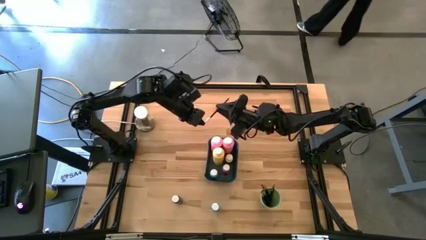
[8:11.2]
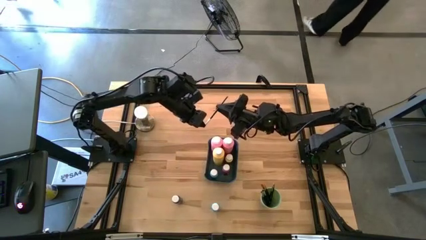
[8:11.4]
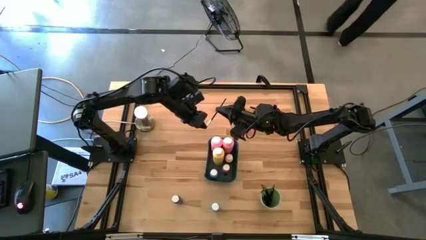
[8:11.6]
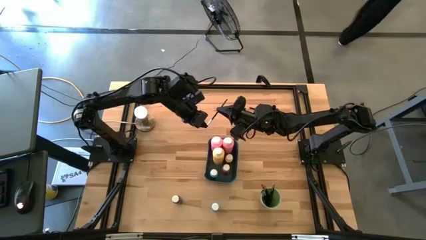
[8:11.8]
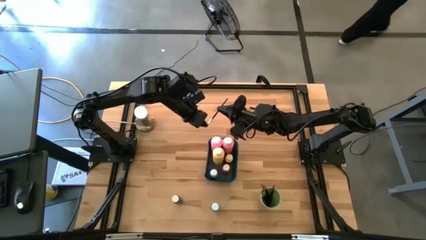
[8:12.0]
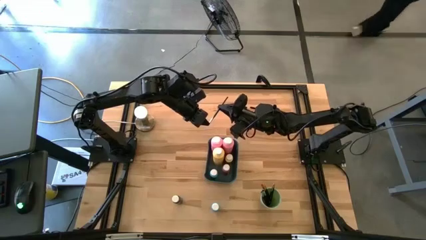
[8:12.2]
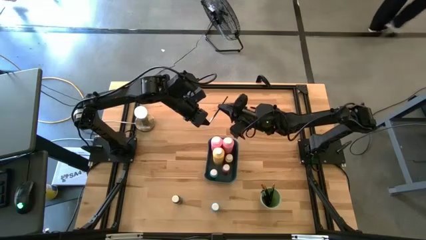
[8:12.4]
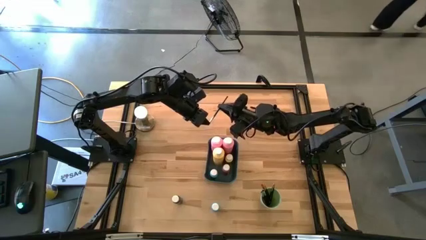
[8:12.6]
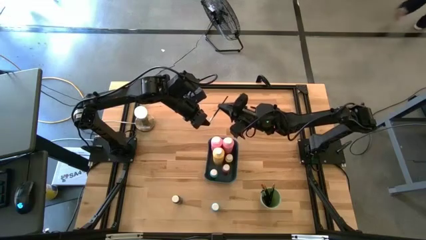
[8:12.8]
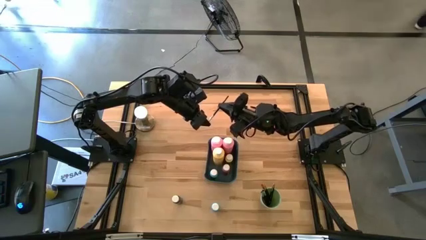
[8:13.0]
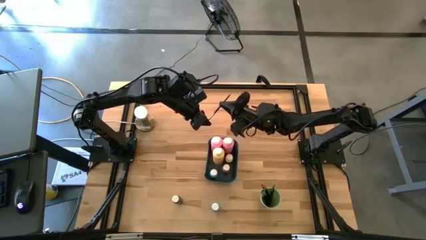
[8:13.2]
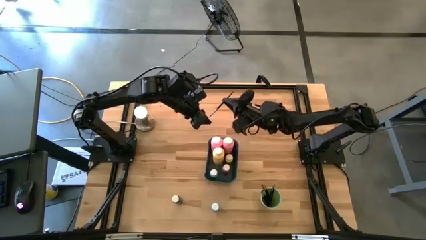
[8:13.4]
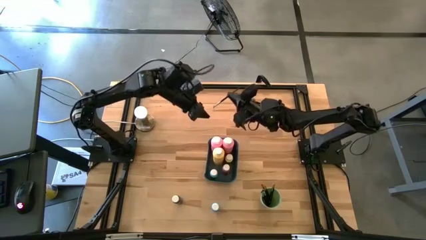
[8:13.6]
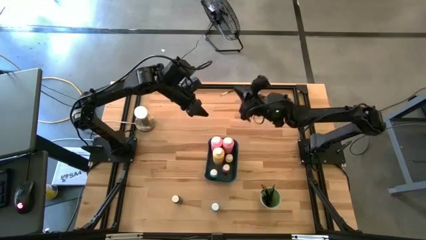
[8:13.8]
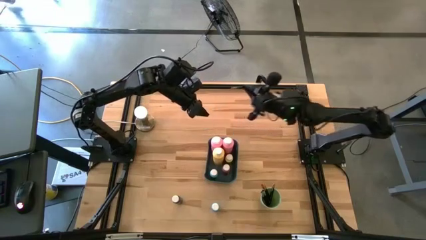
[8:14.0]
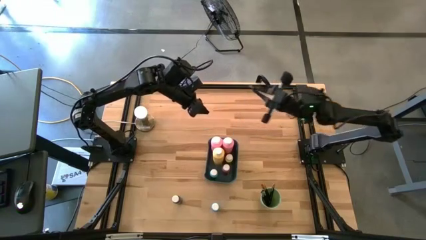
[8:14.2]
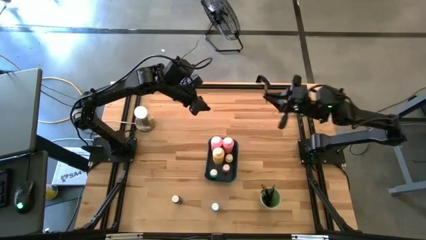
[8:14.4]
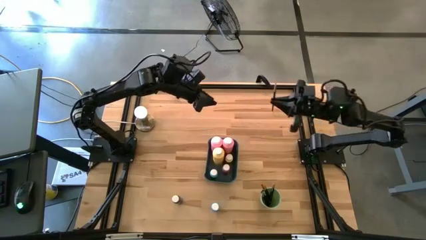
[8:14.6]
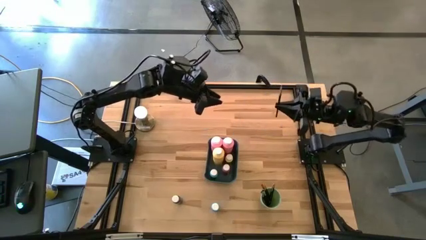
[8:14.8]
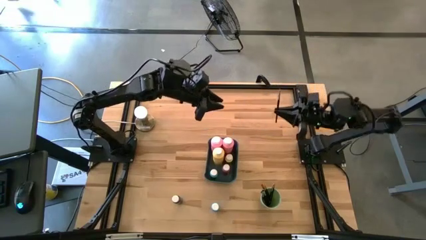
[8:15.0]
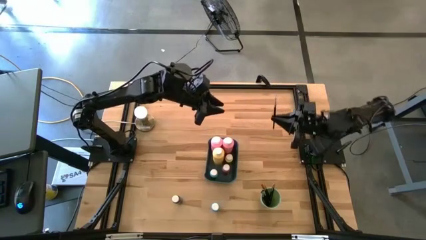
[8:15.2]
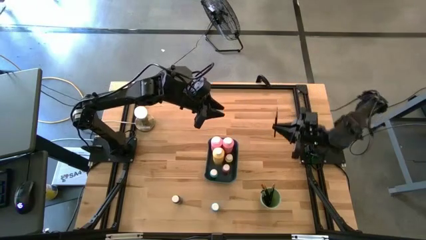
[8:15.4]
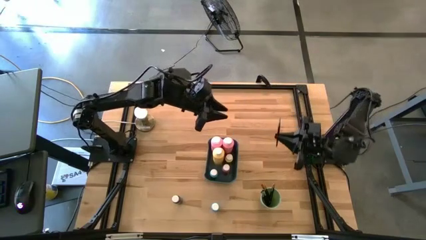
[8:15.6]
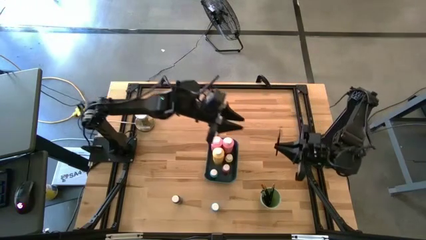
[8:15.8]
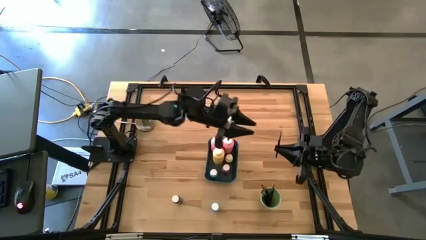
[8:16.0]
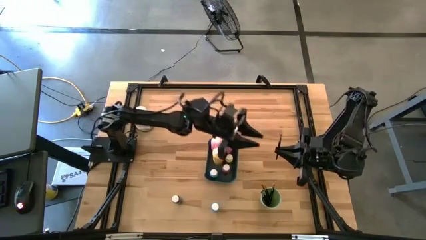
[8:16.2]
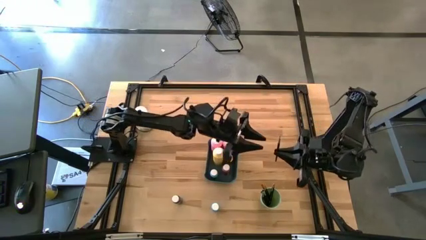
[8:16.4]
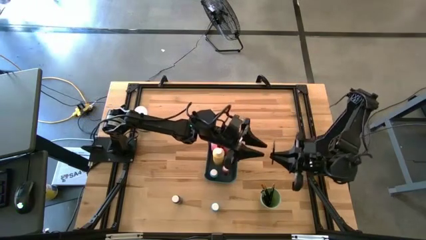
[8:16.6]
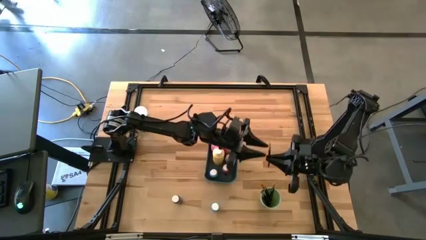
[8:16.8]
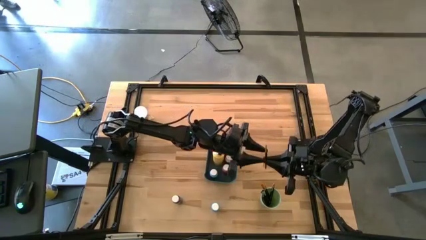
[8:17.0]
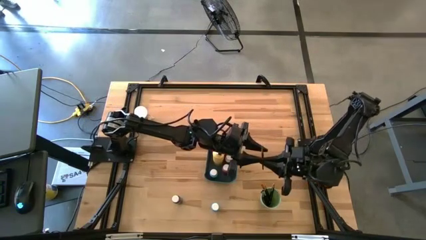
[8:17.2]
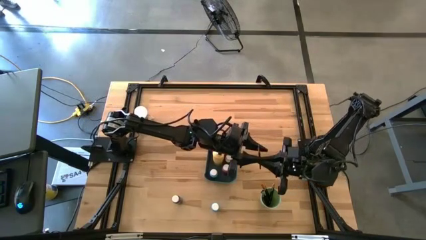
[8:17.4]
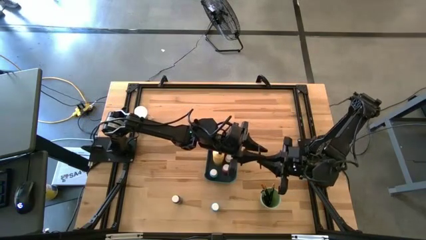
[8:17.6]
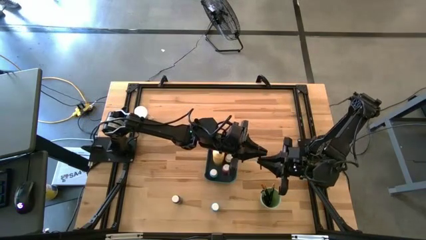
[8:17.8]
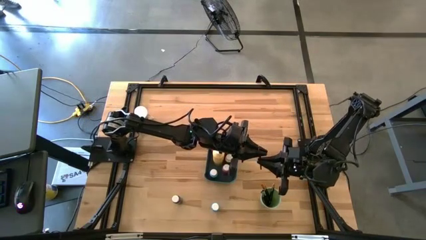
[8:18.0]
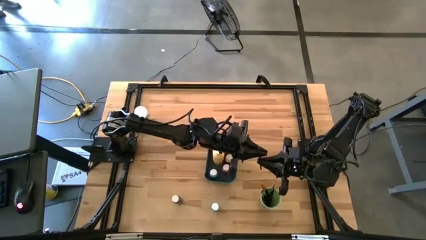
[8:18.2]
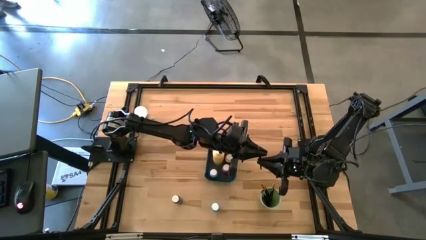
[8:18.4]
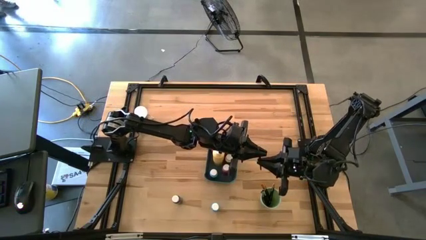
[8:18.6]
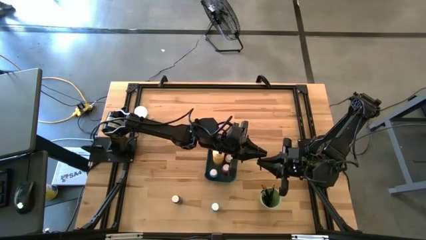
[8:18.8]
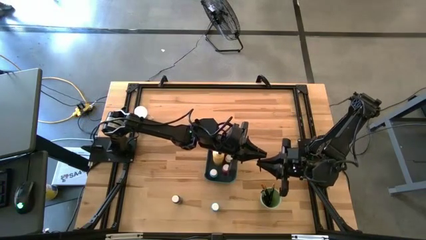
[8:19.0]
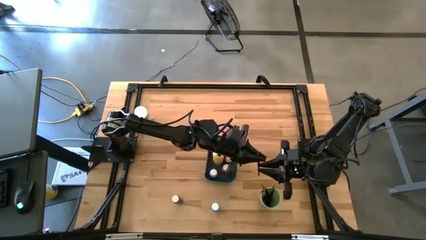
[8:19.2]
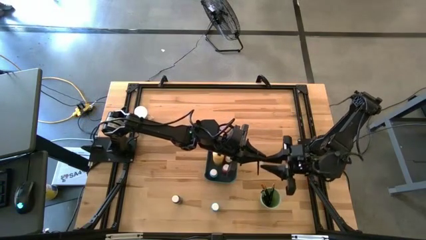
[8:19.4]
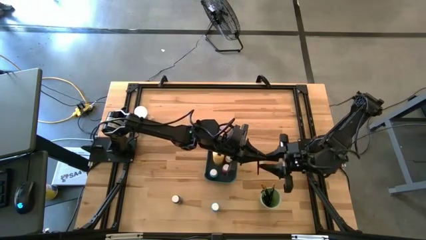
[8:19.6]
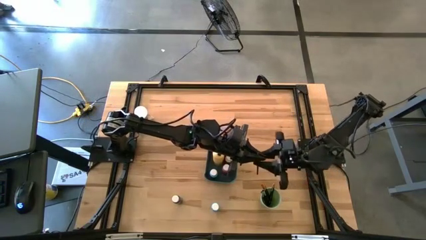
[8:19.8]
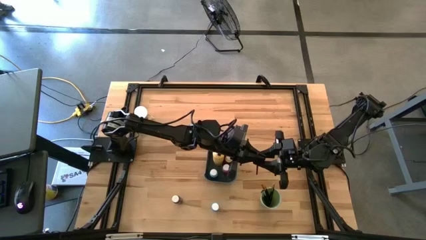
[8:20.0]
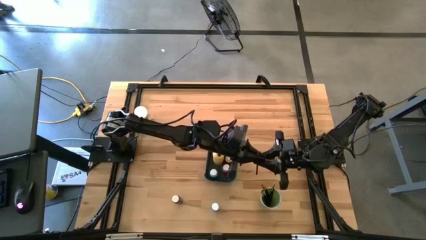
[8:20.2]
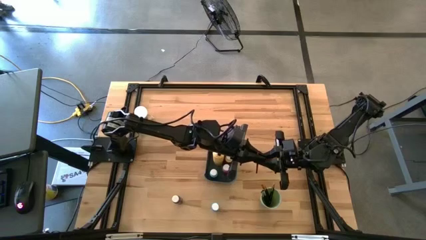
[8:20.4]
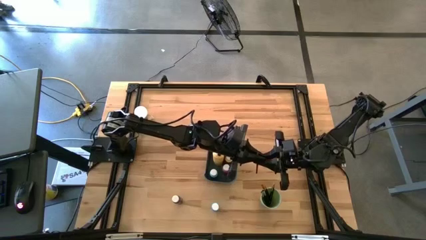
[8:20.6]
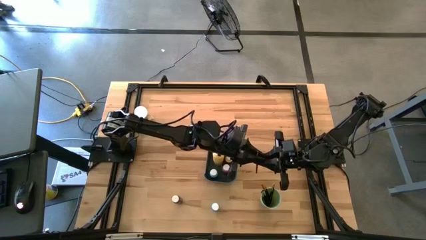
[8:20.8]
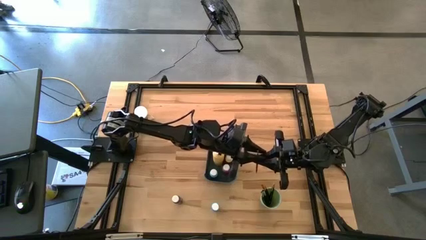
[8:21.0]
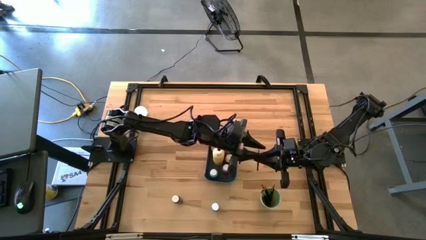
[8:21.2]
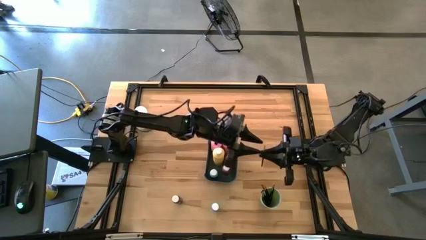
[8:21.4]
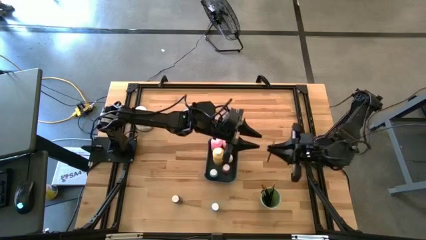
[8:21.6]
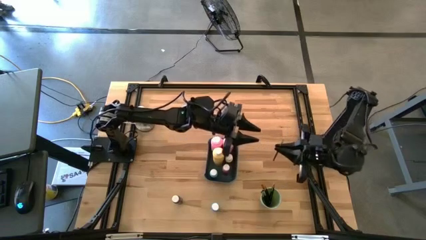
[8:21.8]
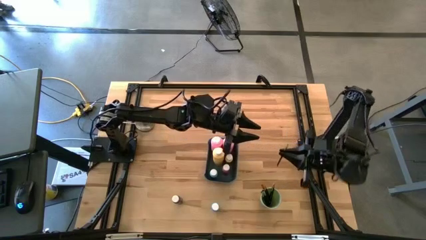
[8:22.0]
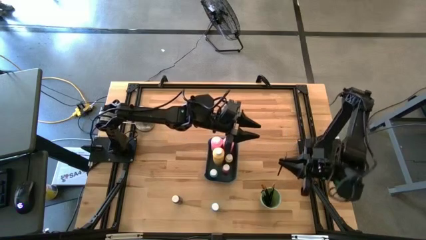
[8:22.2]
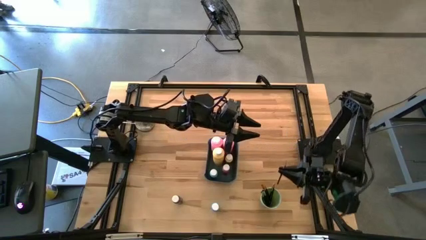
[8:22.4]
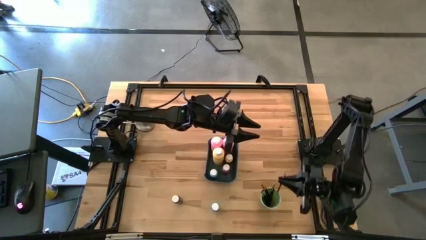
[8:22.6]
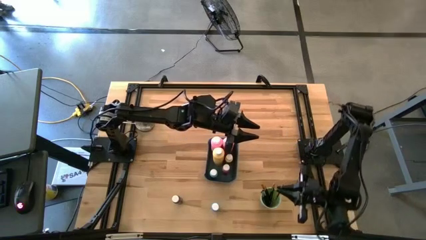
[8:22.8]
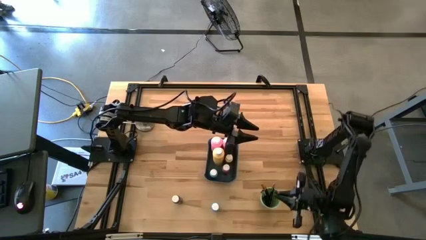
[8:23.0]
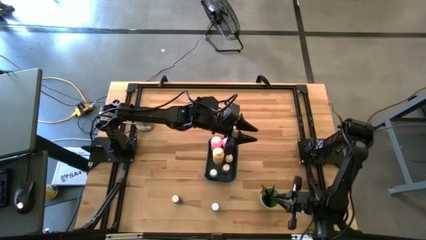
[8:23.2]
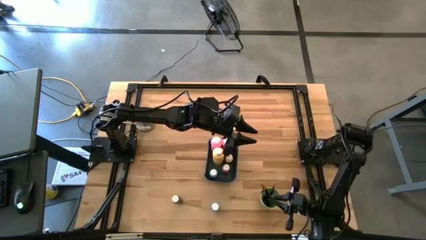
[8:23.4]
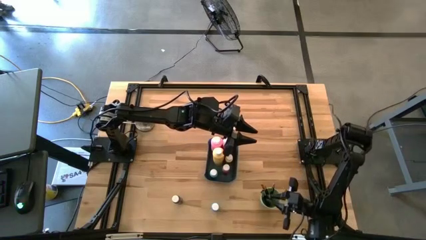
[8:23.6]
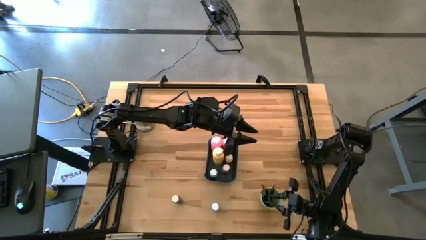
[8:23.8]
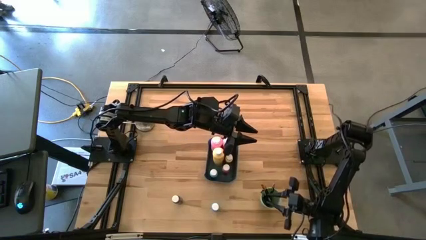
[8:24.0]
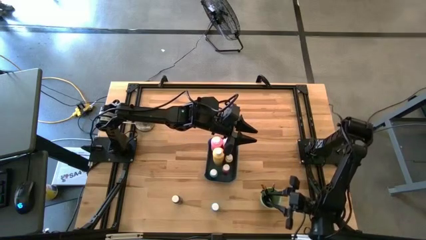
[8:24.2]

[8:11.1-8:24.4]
Task: Pick & Place Paint Supplies
Put the black and silver paint brush into the green cup
